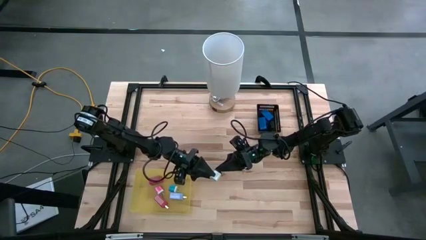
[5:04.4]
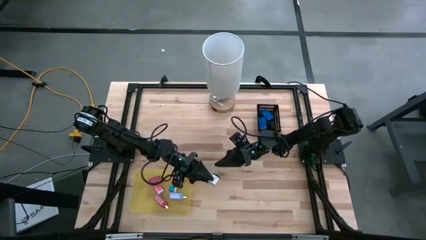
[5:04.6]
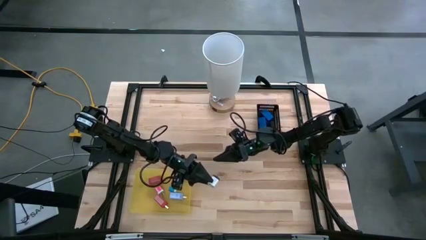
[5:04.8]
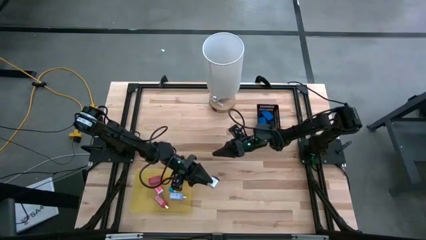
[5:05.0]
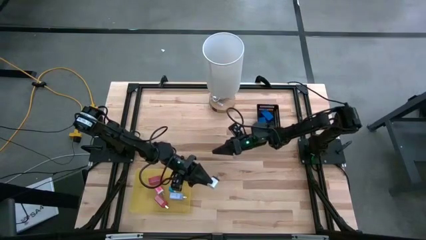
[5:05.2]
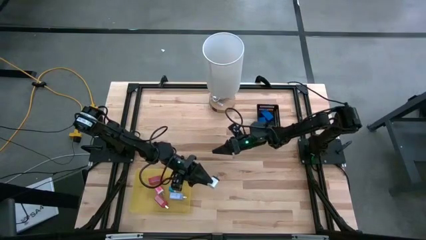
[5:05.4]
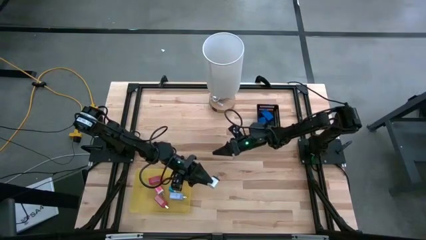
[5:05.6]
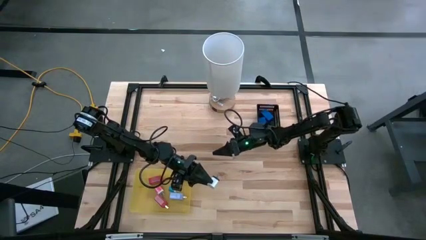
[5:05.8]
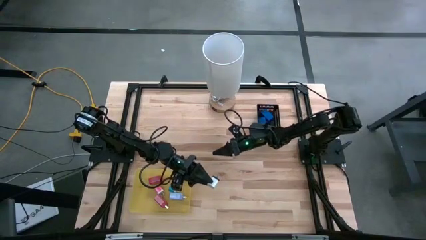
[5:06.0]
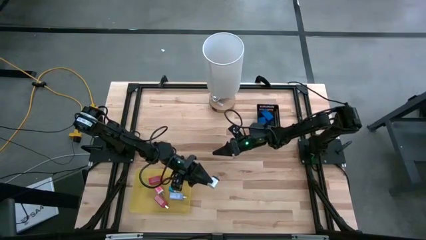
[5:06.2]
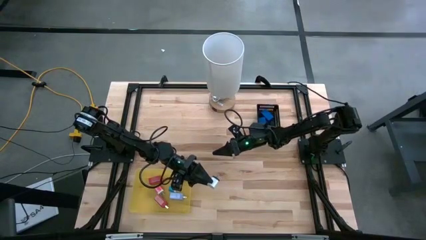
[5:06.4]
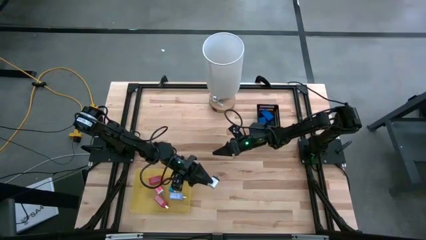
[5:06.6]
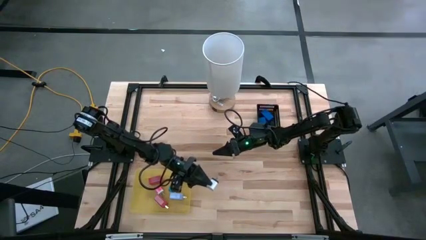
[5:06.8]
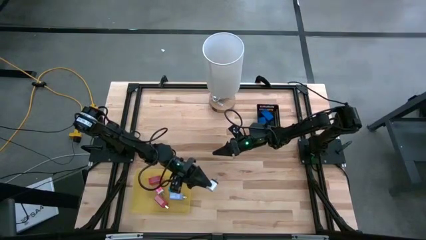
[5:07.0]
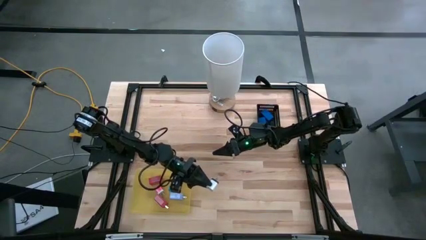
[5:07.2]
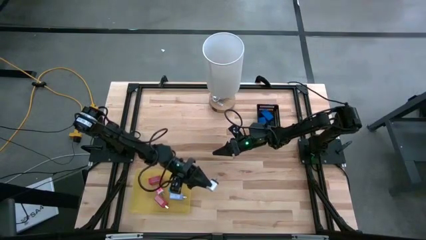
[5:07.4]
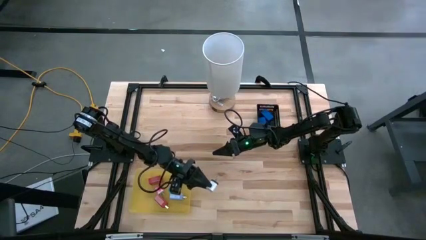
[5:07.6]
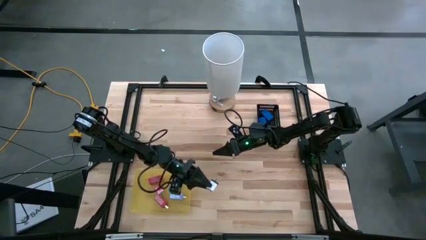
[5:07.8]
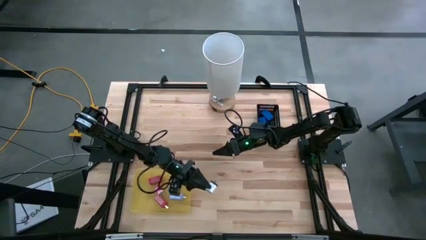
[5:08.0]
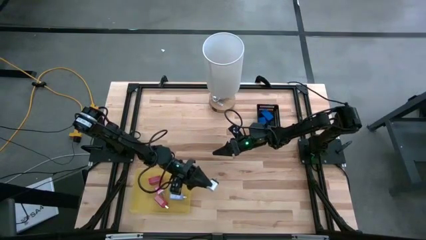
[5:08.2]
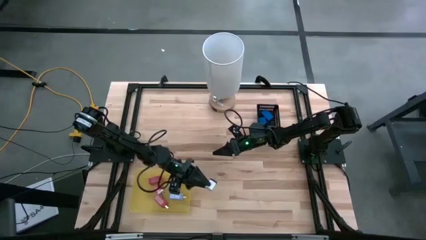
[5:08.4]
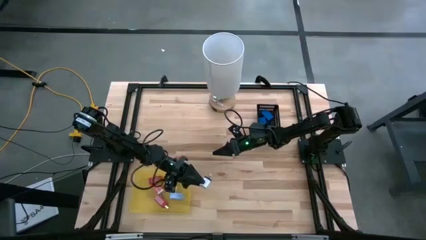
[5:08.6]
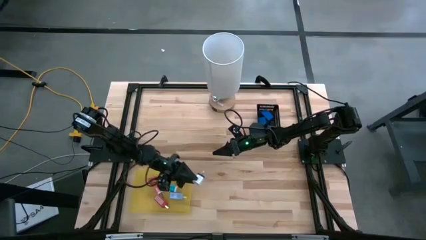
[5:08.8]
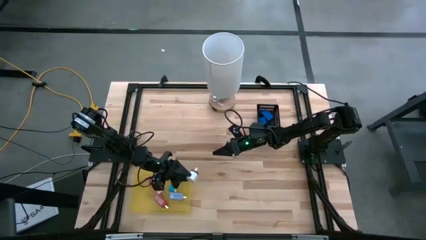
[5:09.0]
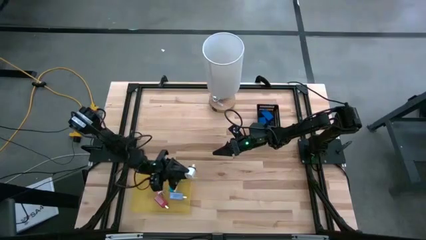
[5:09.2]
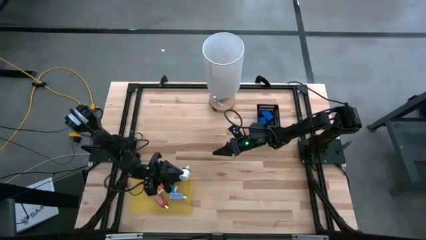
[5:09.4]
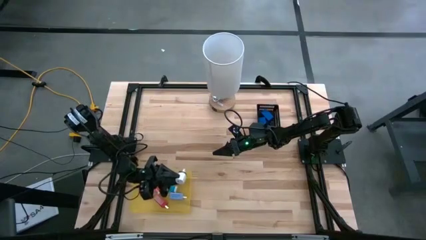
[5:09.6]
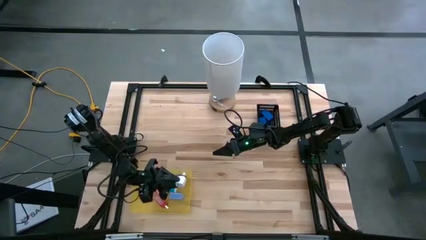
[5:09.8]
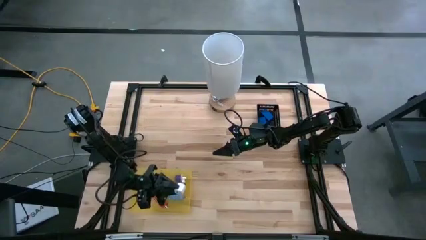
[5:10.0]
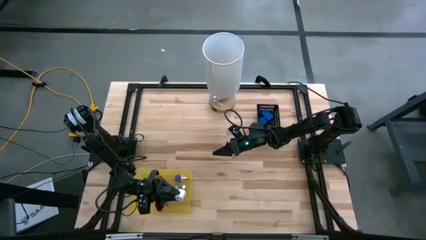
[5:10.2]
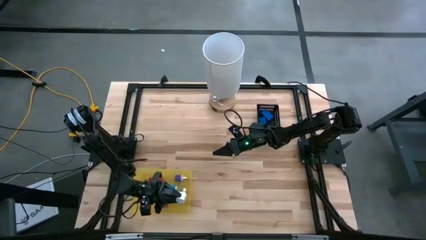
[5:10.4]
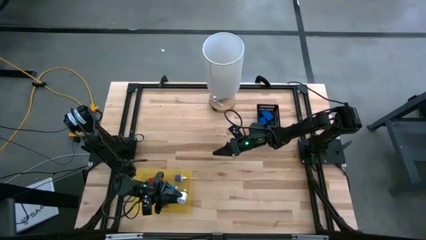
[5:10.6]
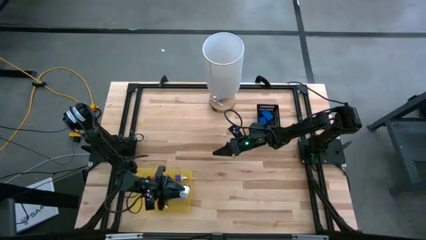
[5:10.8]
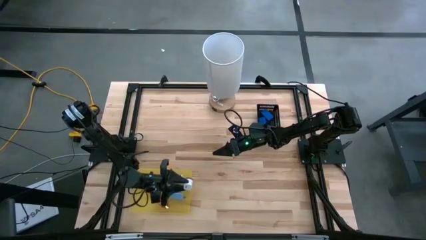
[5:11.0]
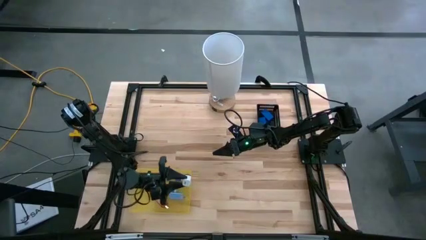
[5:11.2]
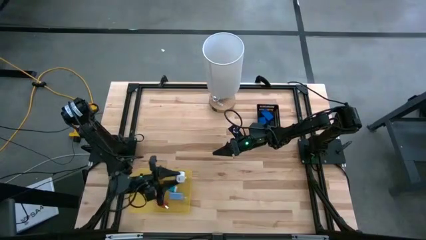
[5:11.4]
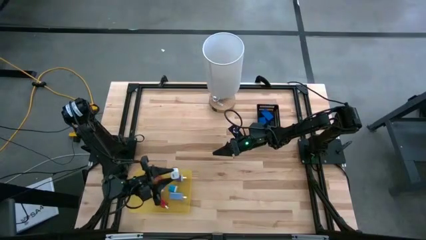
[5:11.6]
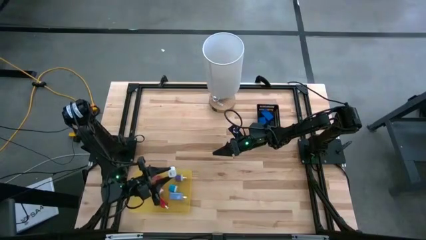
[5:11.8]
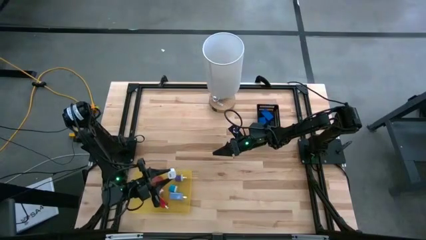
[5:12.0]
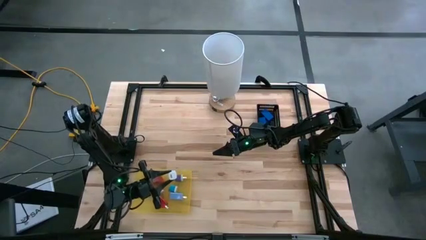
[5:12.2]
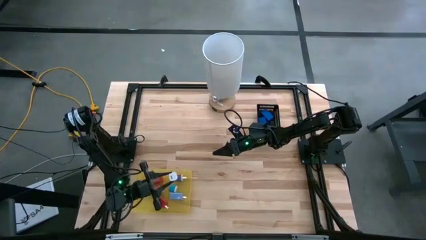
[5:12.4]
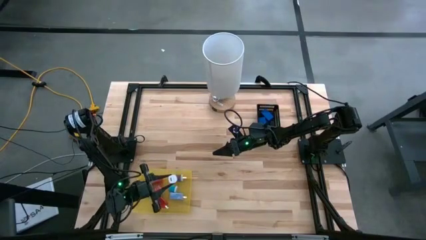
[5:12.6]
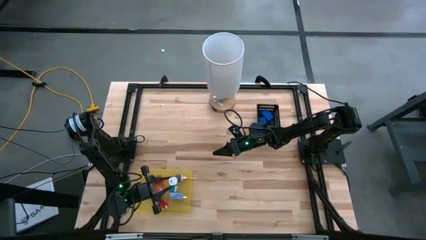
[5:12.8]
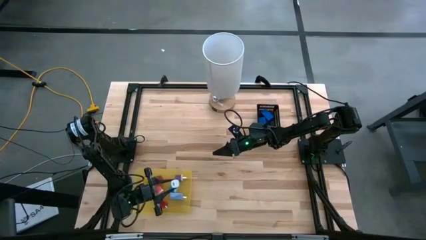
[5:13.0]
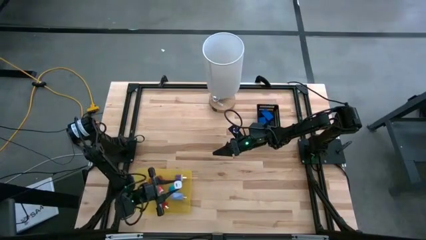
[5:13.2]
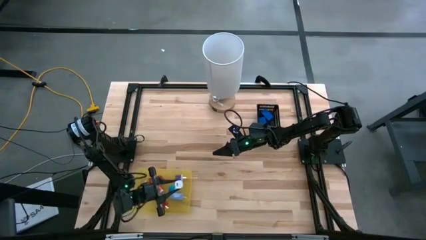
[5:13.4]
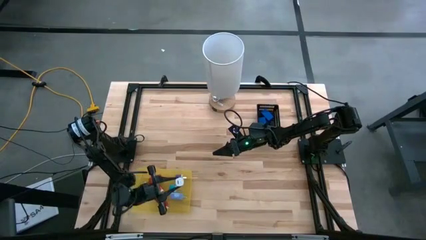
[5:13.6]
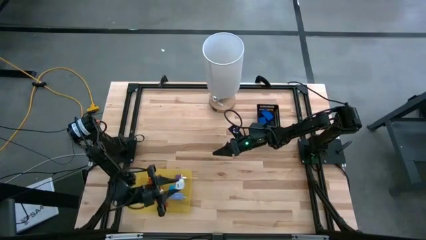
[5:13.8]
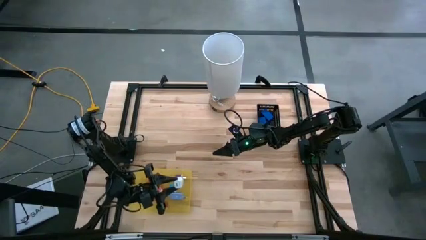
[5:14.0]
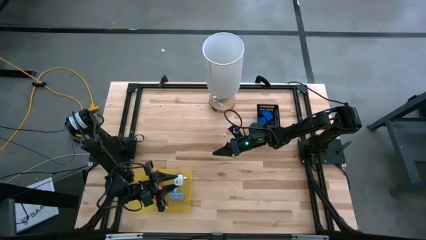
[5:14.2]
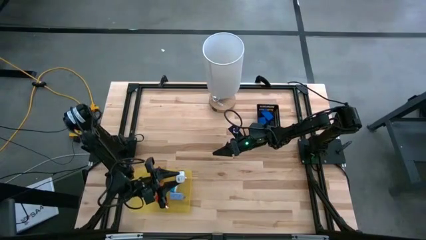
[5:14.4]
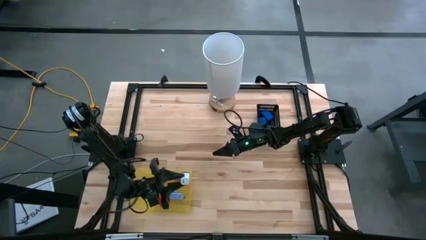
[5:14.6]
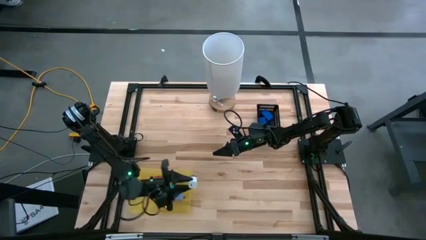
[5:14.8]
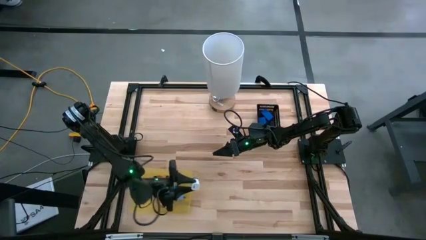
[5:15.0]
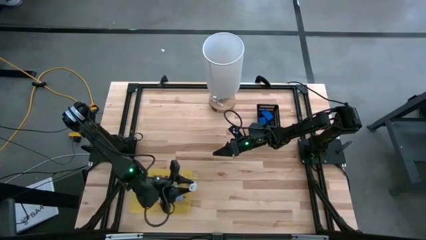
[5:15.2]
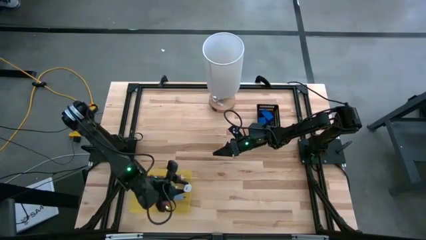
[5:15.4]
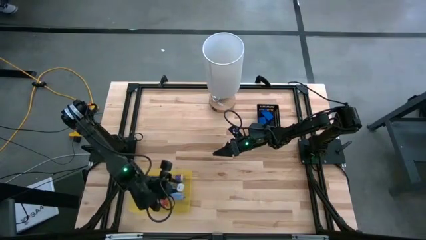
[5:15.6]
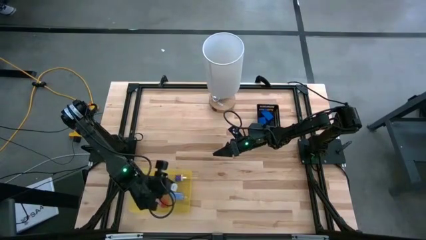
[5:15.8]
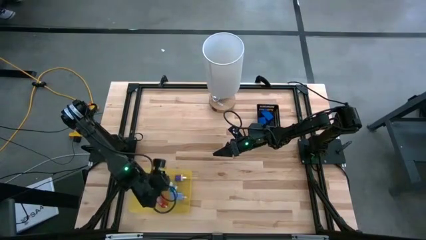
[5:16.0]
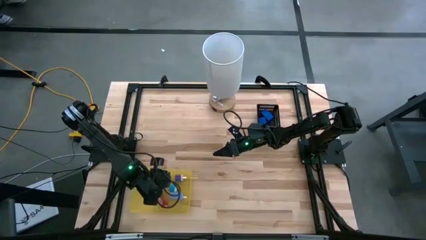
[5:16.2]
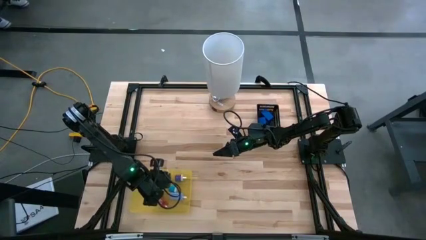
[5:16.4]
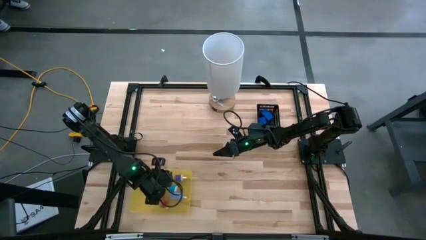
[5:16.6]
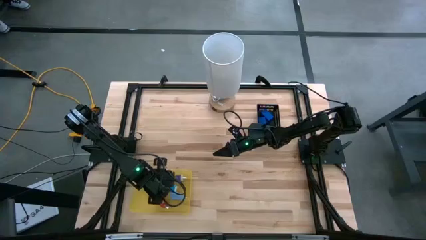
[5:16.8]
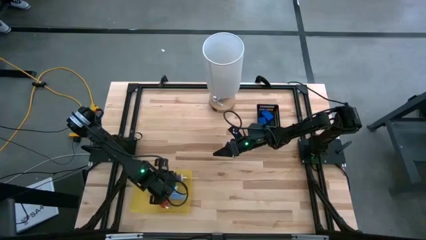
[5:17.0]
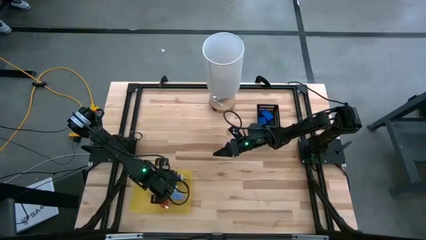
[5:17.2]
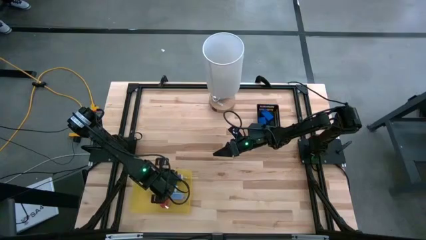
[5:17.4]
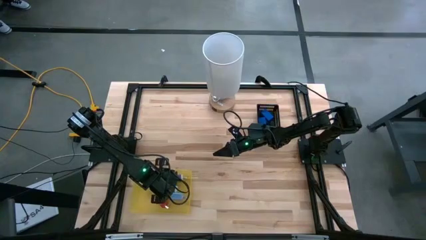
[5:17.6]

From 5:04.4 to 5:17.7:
Task: Pick & Place Office items
Put the white charger adapter into the yellow bin

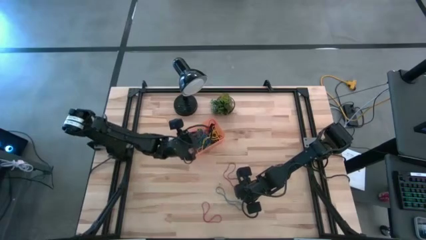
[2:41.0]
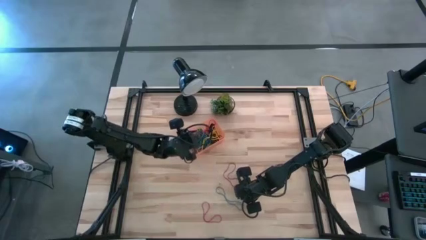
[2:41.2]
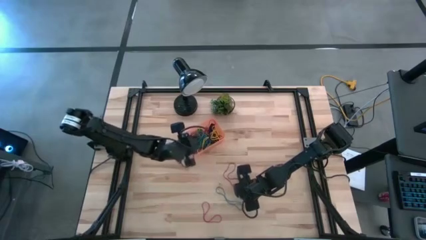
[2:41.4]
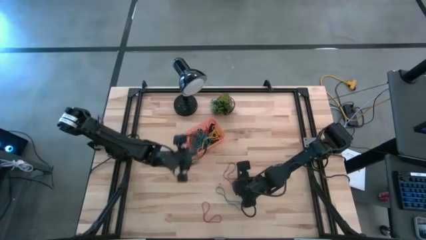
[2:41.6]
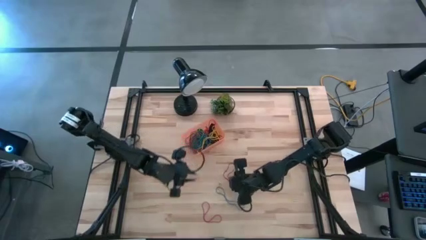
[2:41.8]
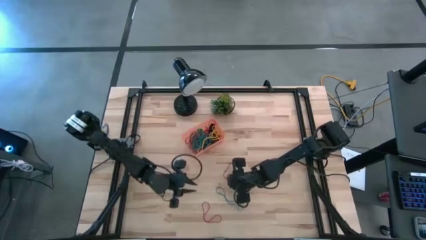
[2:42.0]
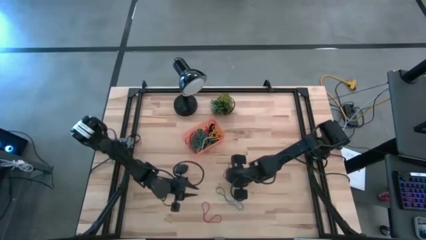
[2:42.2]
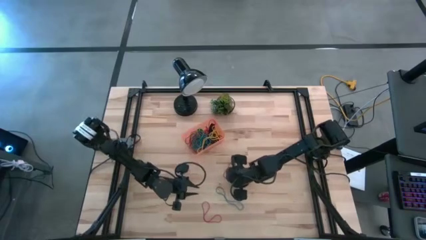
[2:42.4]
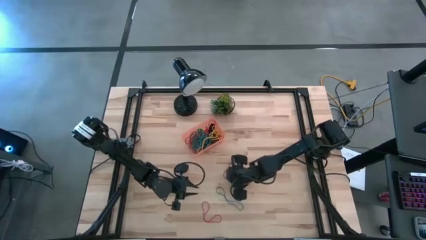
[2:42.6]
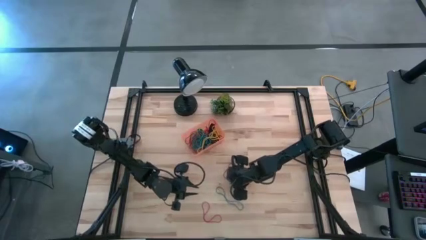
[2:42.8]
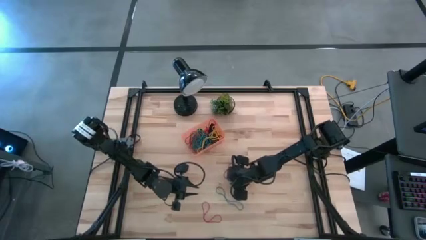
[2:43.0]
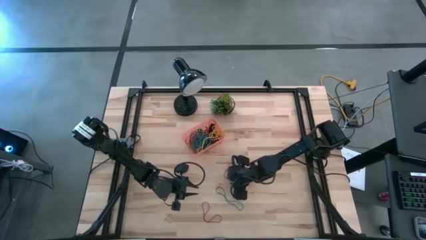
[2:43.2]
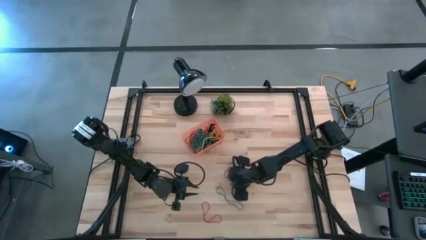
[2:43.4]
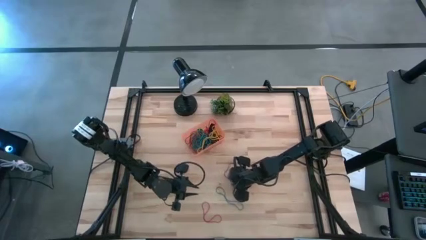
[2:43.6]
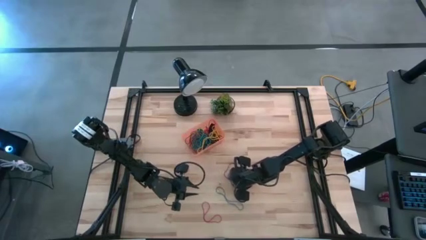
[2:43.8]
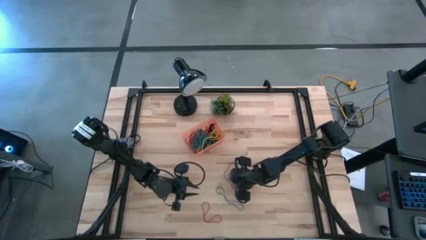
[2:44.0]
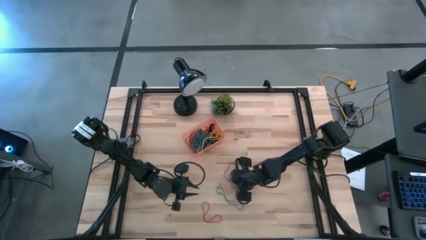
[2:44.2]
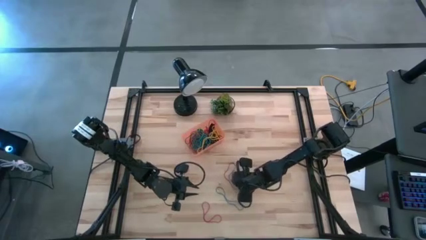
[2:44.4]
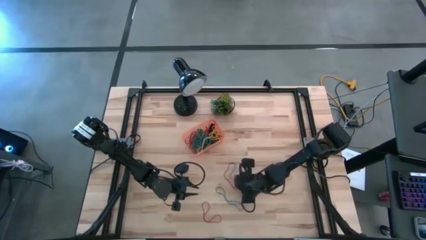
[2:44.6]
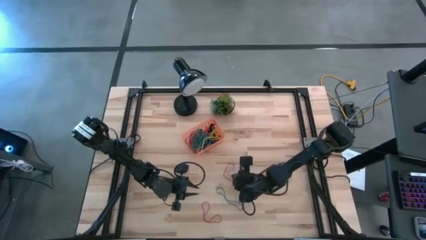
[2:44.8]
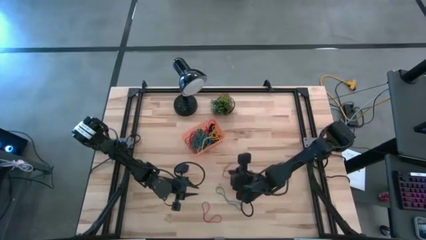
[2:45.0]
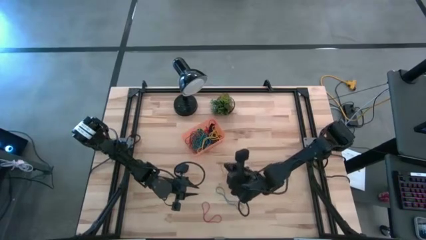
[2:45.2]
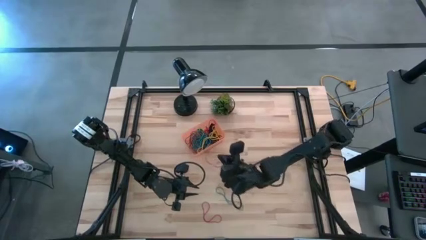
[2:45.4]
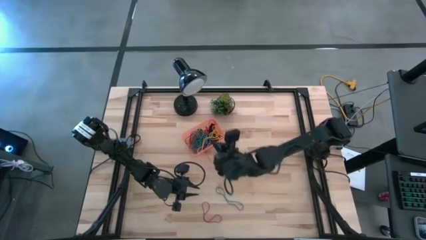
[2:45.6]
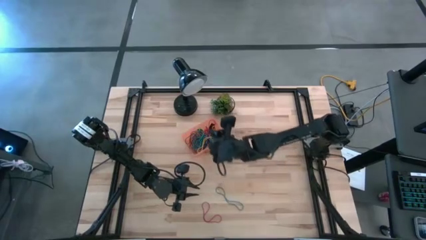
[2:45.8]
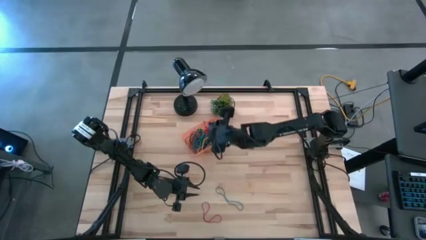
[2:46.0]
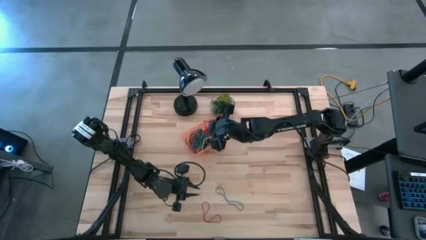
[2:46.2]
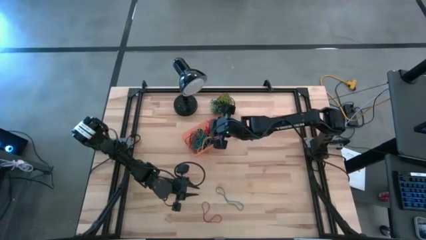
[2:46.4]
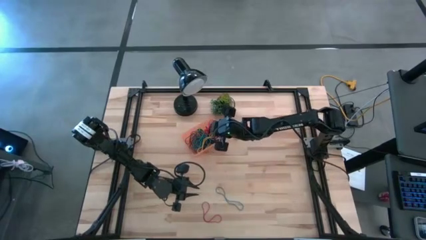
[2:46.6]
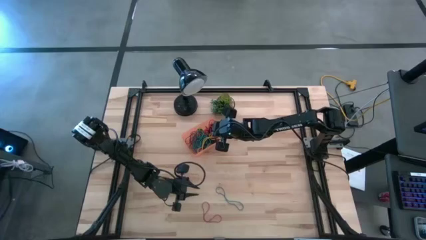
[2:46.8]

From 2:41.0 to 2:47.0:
Task: Pick and place rubber bands into bin
Put the red rubberband into the orange bin
